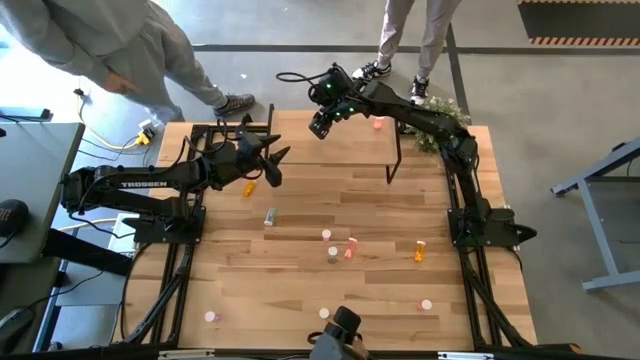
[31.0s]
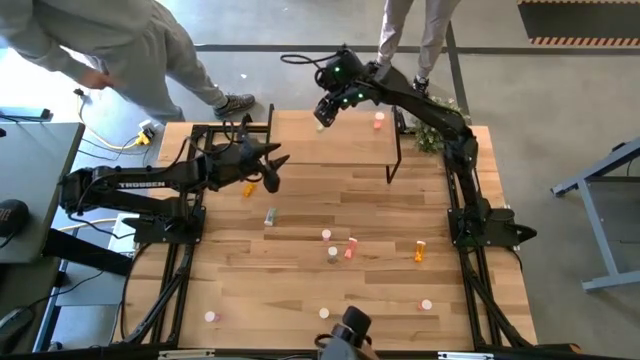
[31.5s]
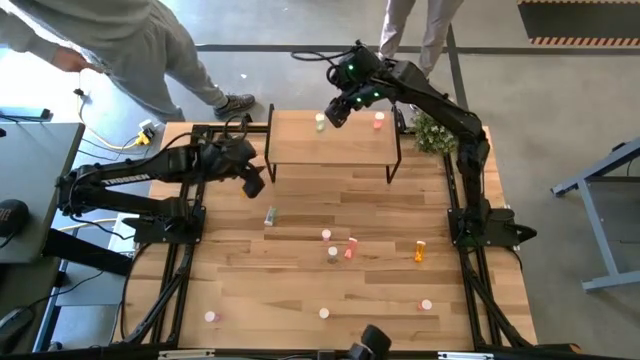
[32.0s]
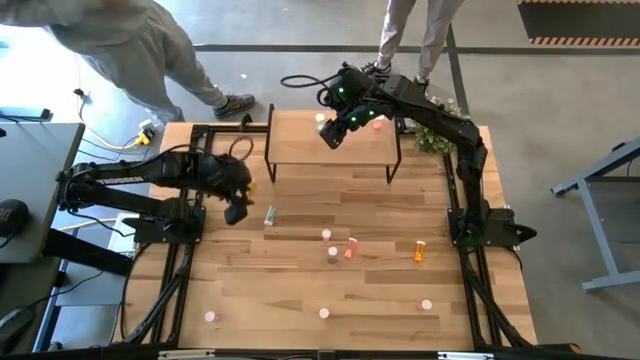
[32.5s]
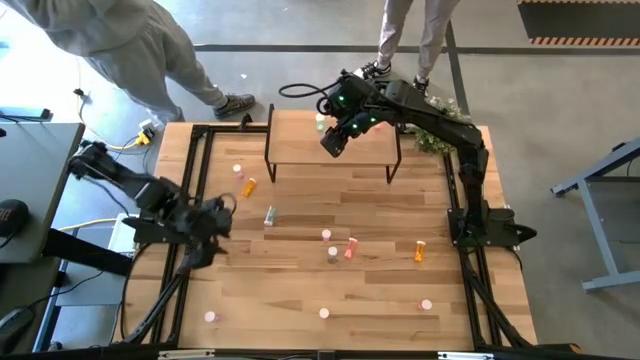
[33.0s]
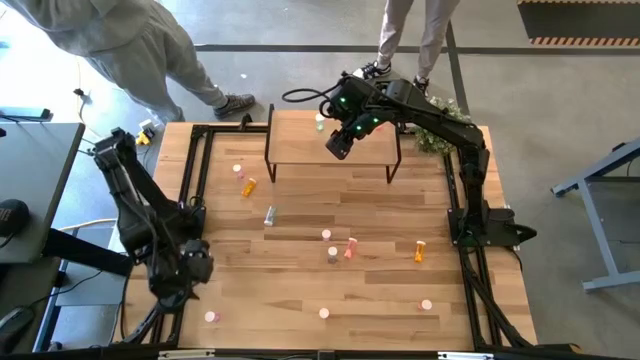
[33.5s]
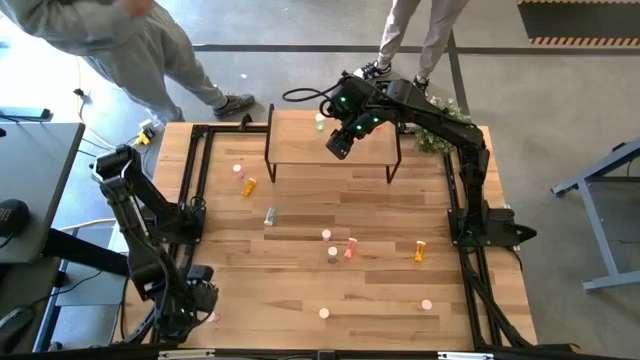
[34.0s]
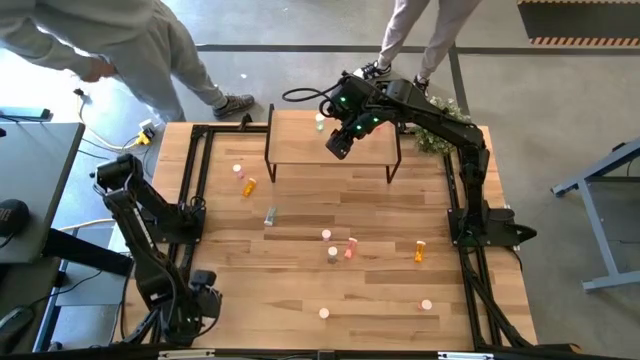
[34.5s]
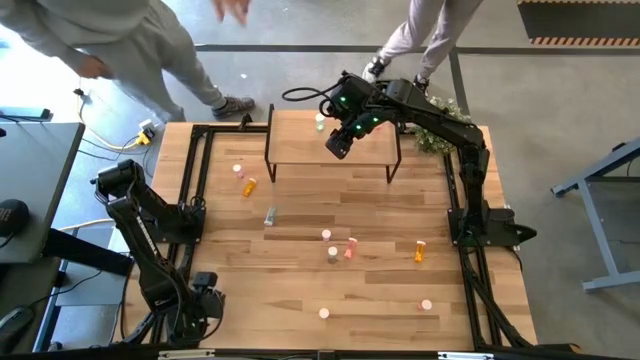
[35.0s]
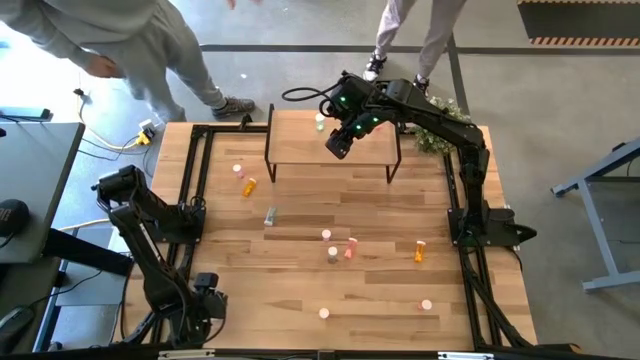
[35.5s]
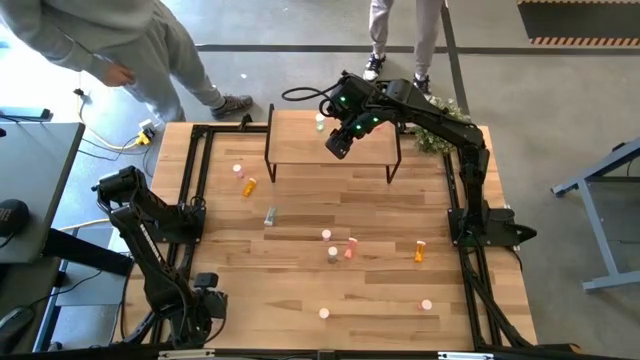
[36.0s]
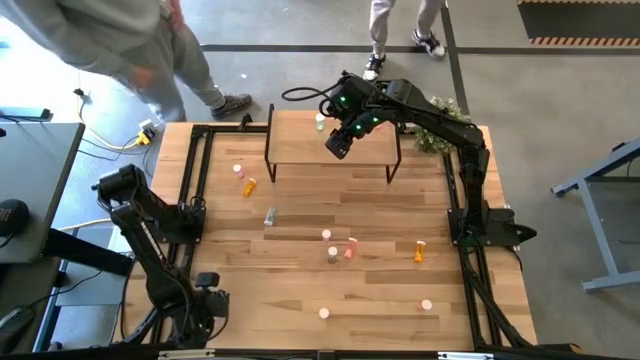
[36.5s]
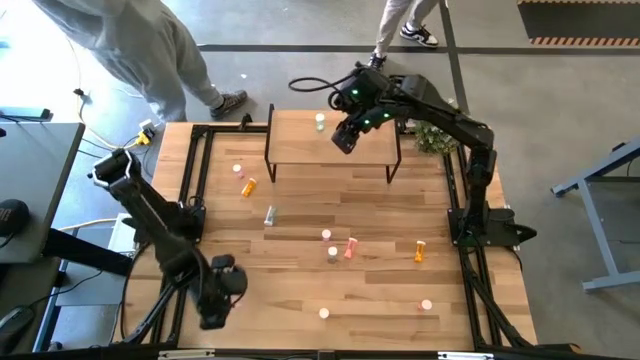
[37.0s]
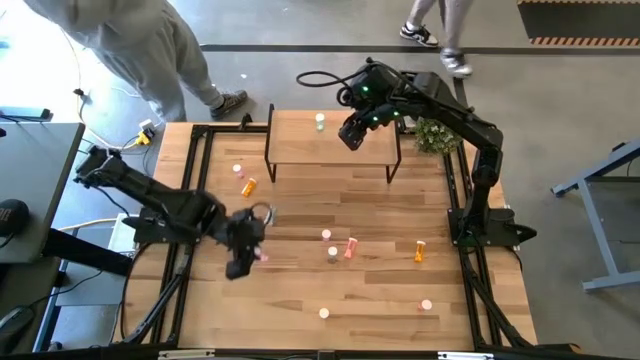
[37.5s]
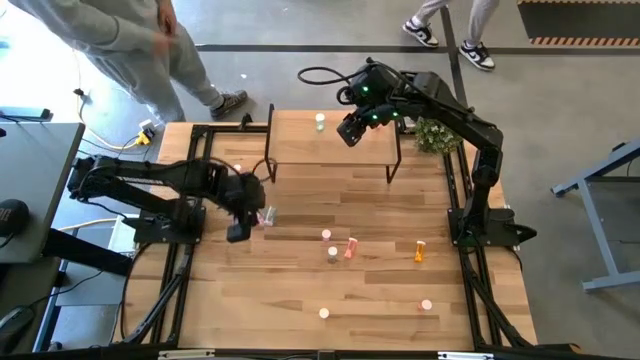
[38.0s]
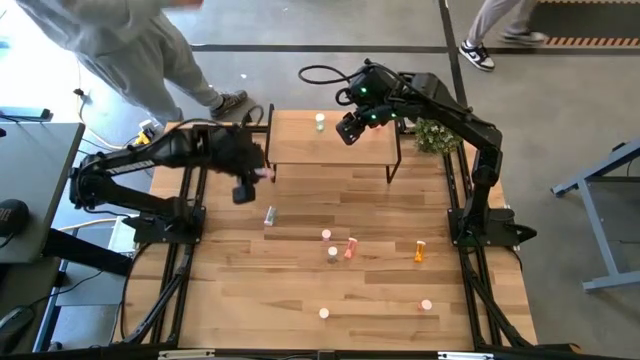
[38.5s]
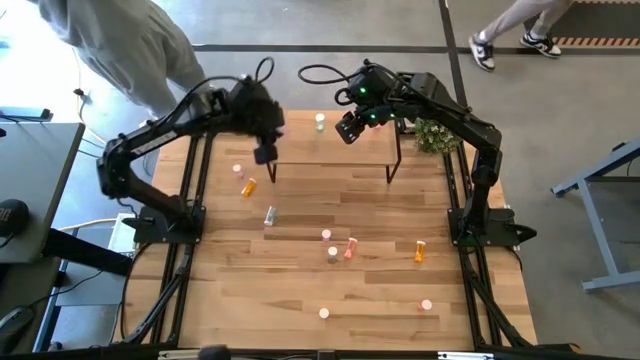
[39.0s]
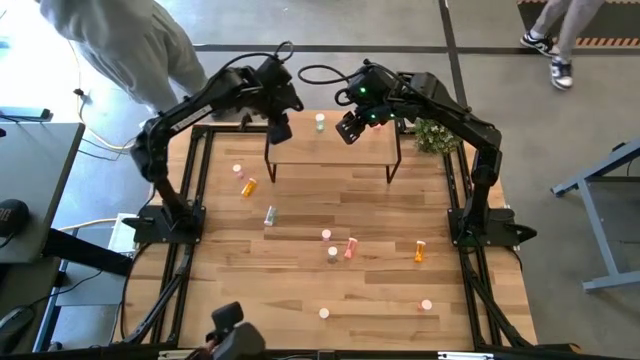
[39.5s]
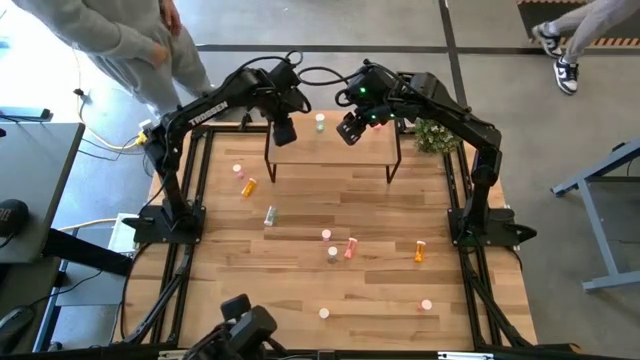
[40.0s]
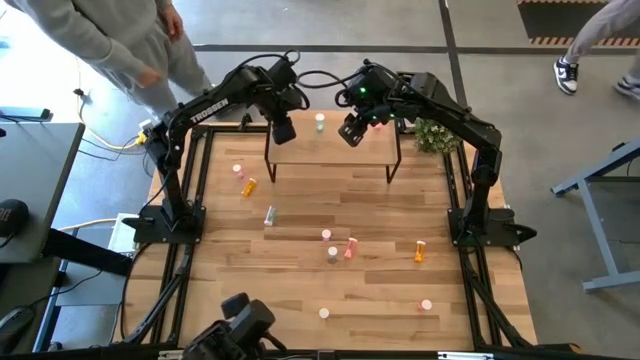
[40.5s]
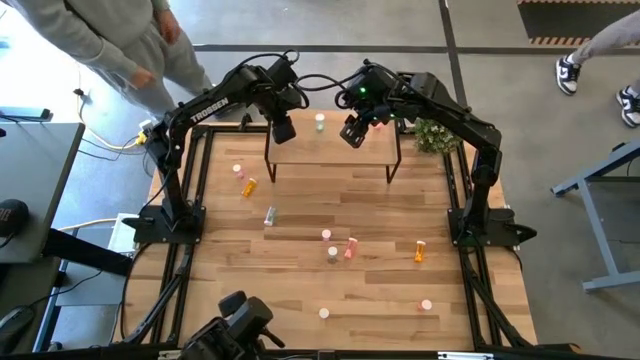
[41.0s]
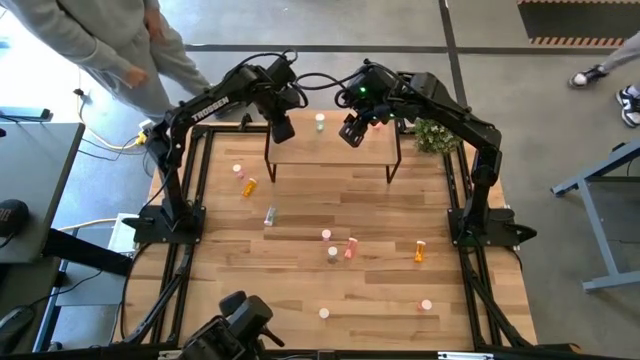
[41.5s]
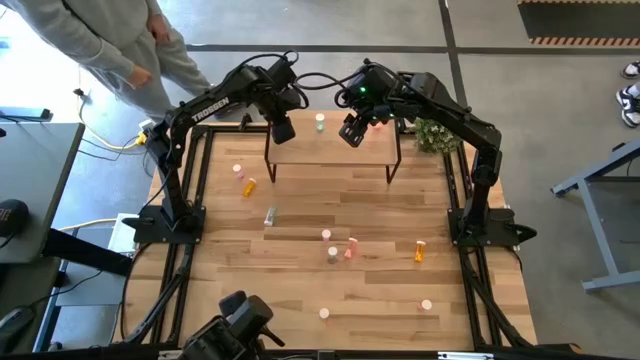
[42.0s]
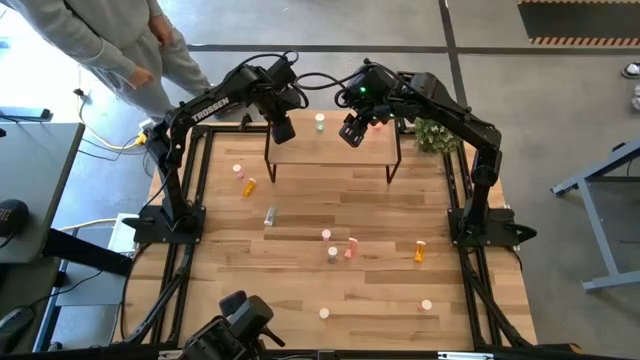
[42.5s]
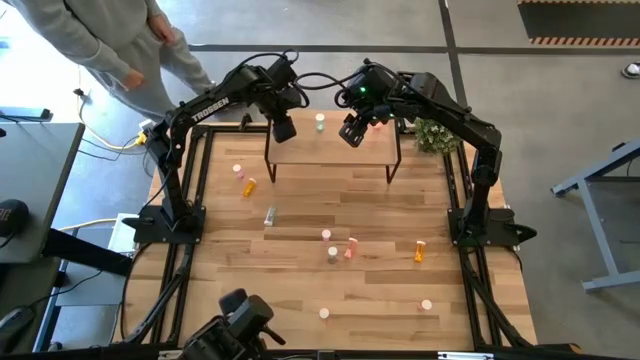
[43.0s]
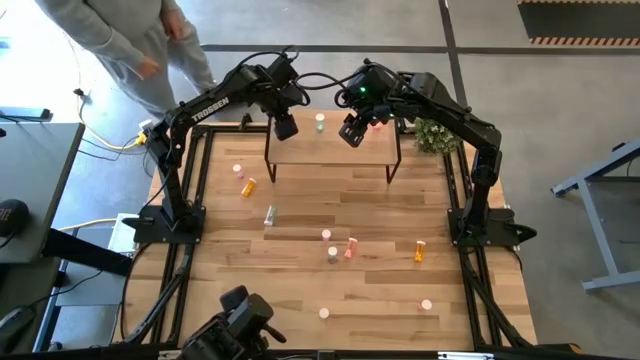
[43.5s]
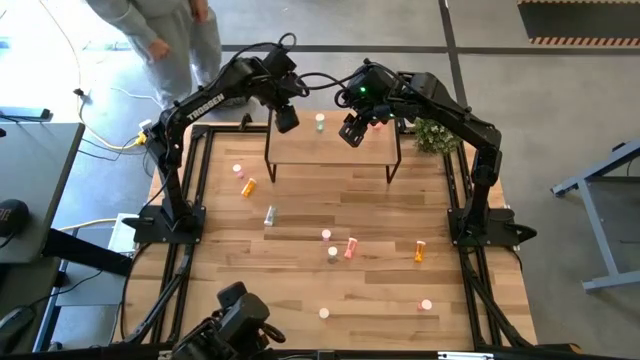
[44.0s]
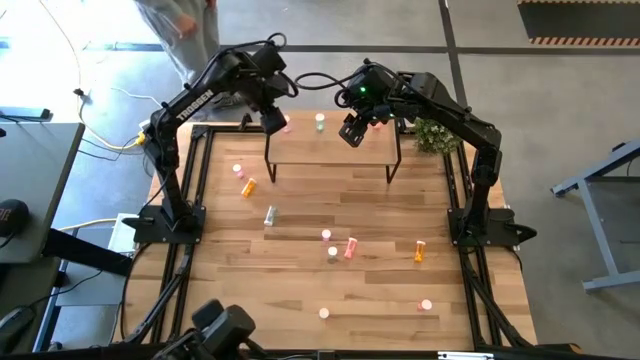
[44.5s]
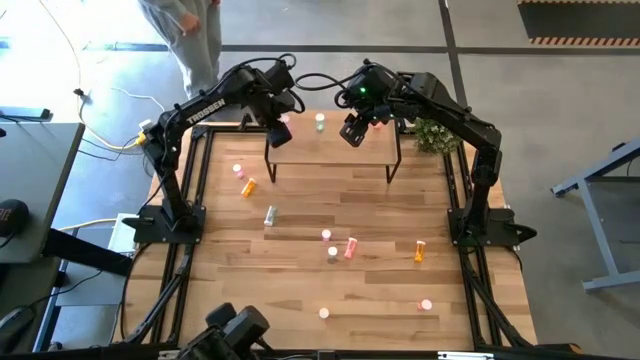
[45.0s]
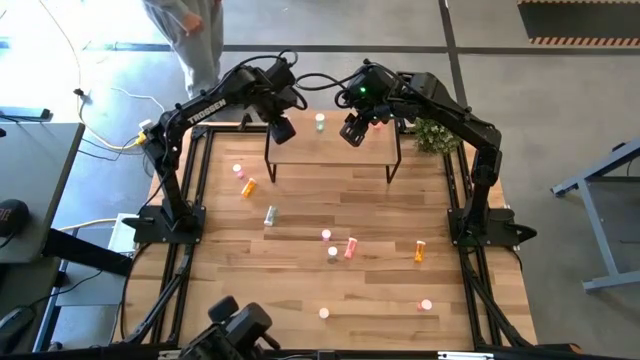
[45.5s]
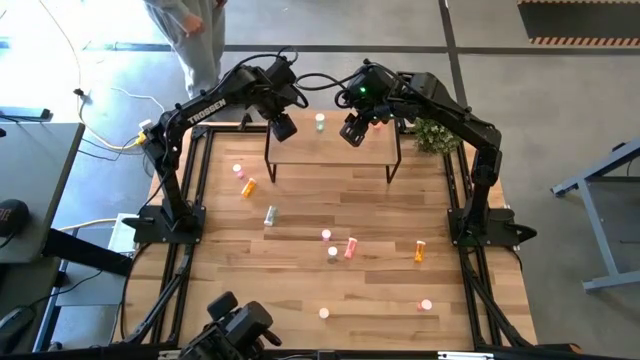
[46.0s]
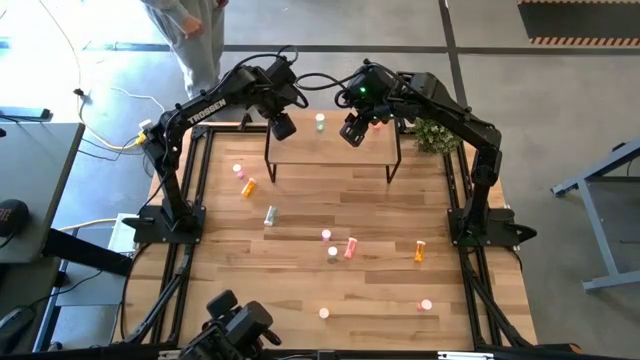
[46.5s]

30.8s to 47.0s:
Task: Pick and place medicine bottles onto shelf by color
Put the bottom pink pill bottle on the shelf

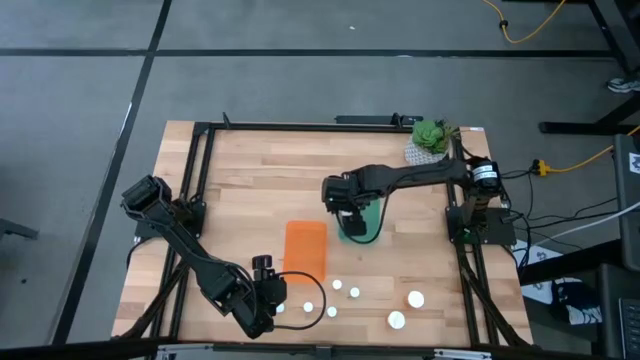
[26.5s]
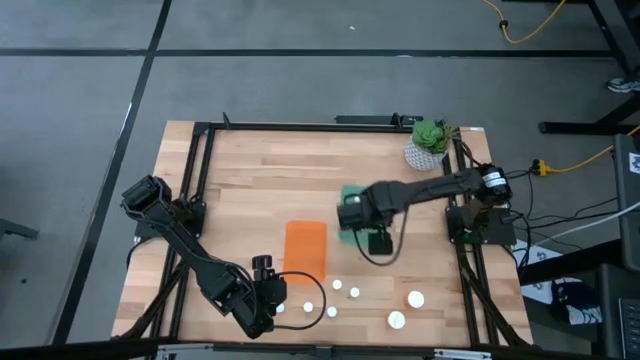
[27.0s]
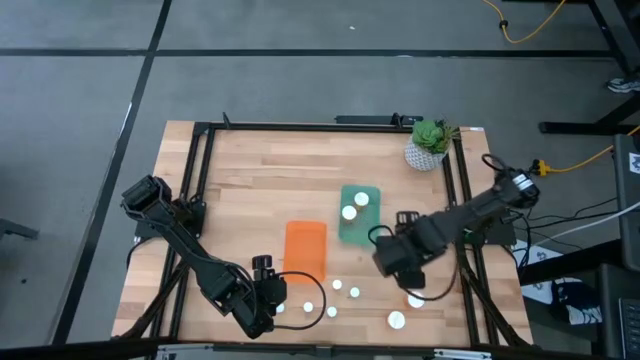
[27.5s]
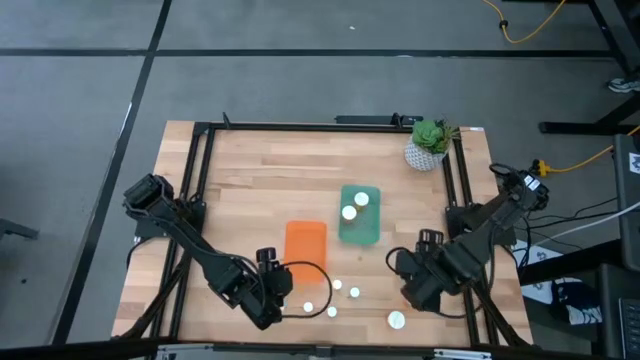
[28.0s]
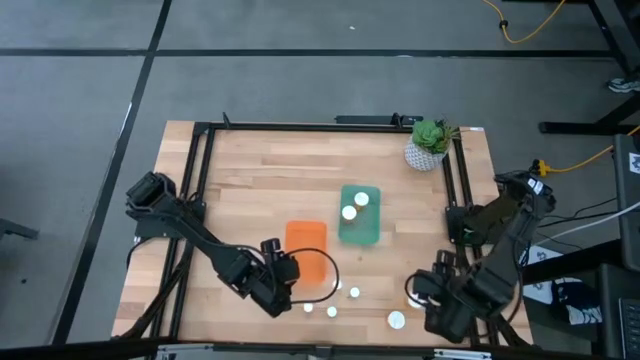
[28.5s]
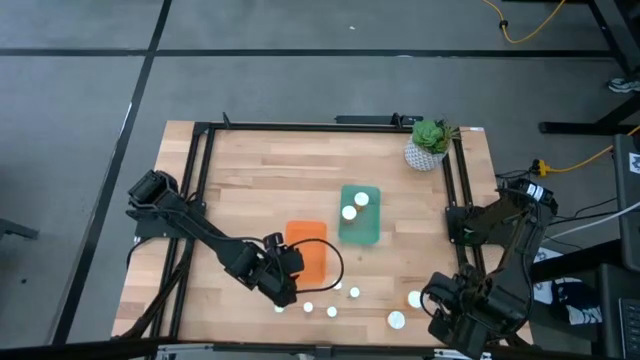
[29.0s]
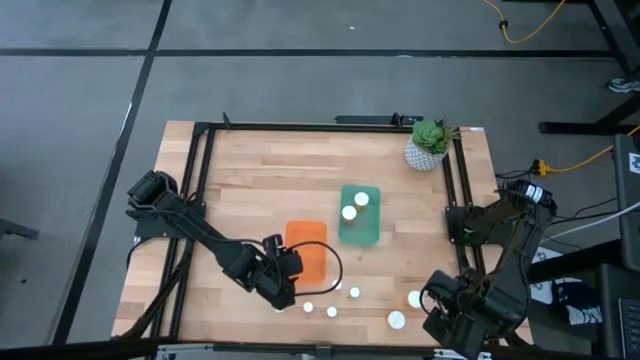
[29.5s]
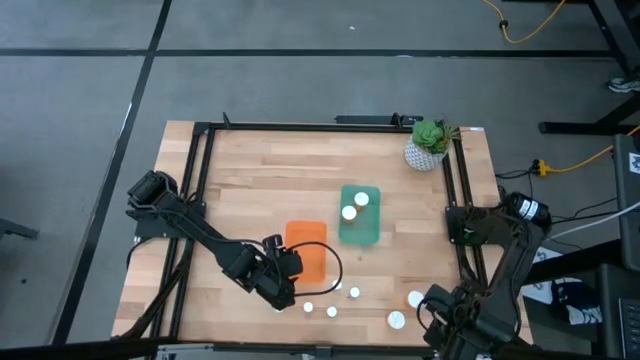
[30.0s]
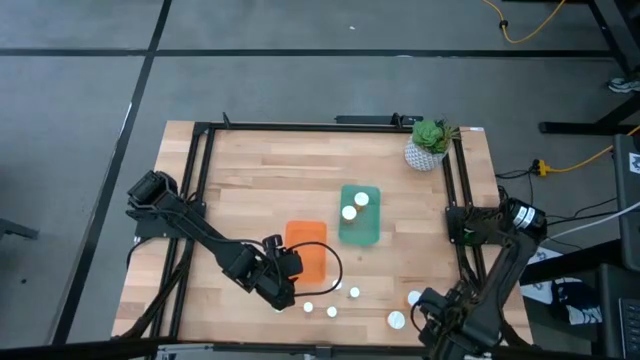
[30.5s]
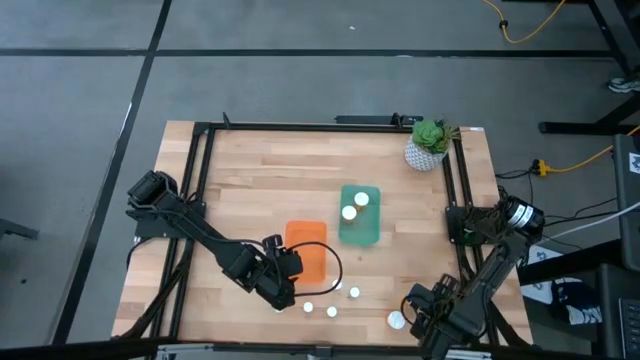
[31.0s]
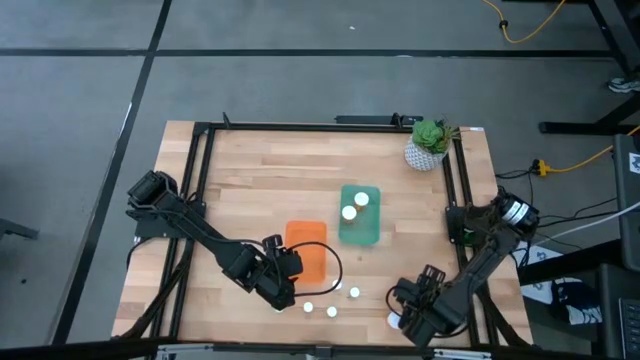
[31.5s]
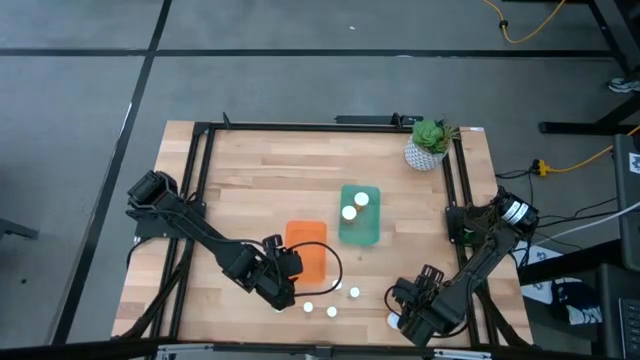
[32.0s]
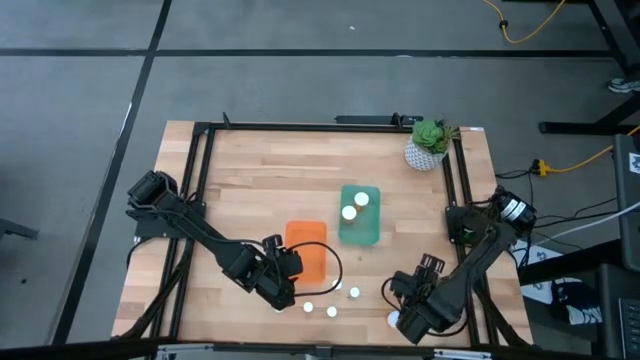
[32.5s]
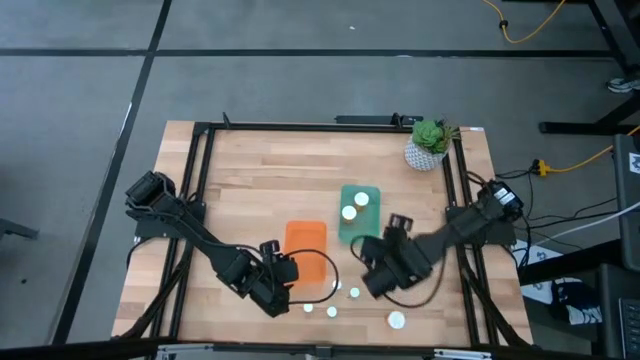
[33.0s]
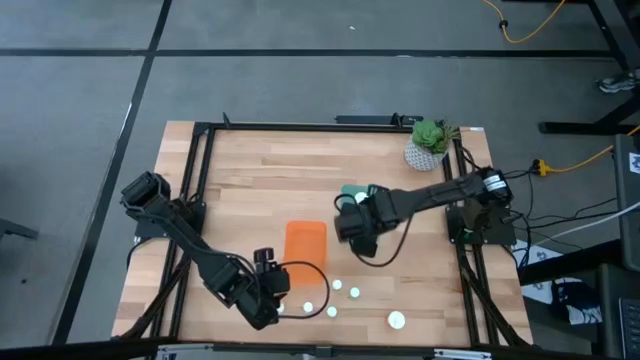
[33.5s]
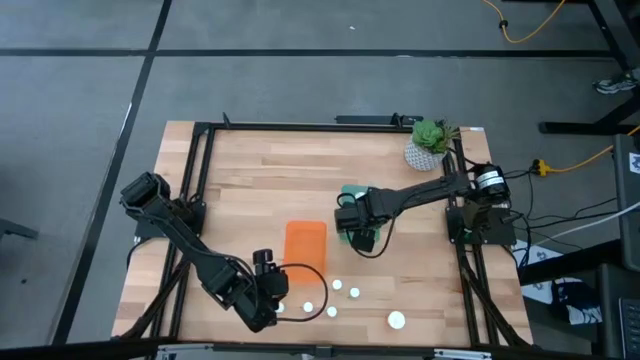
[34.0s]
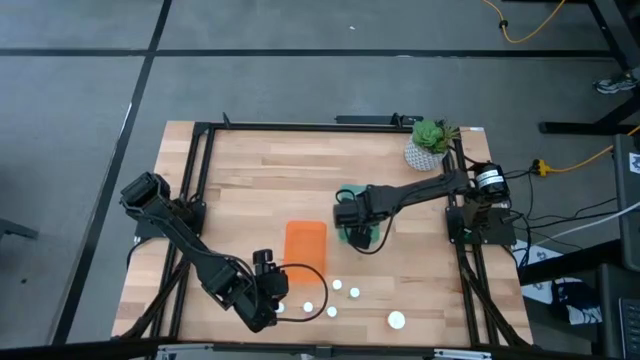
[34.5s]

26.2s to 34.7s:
Task: Pick and place medicine bottles into bin by pill shape (circle, oval)
Put the big orange capsule bottle into the green bin
